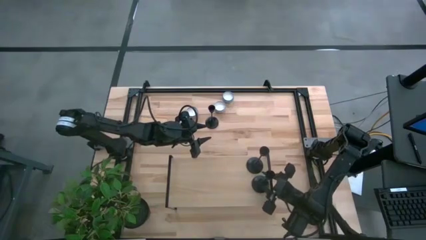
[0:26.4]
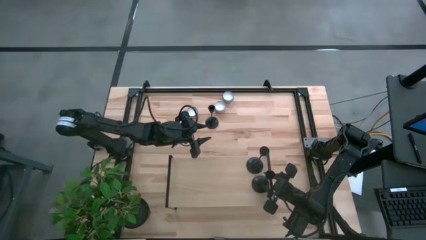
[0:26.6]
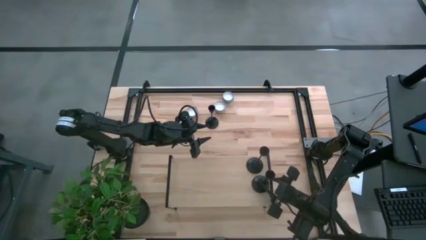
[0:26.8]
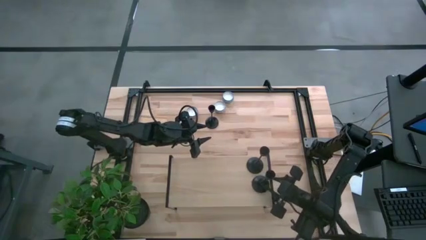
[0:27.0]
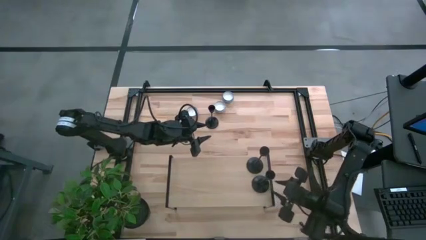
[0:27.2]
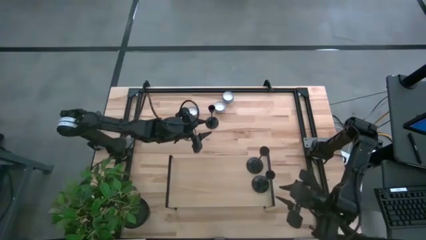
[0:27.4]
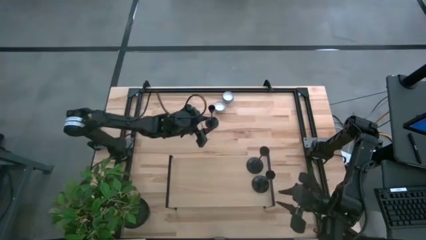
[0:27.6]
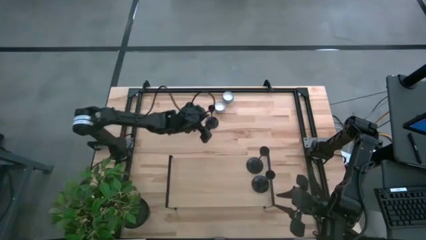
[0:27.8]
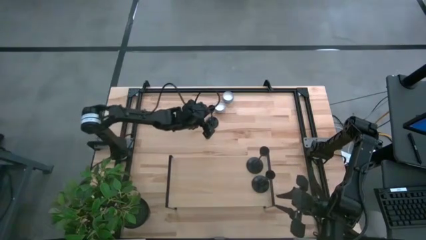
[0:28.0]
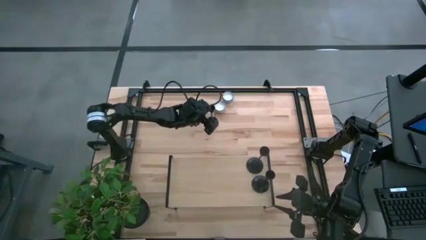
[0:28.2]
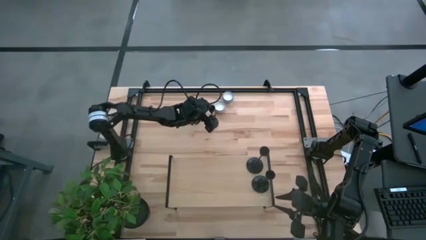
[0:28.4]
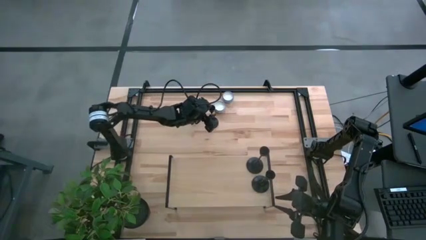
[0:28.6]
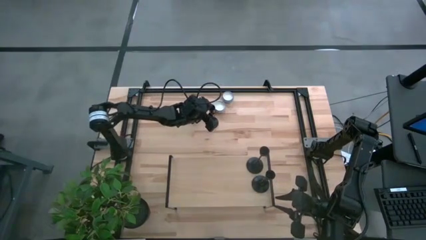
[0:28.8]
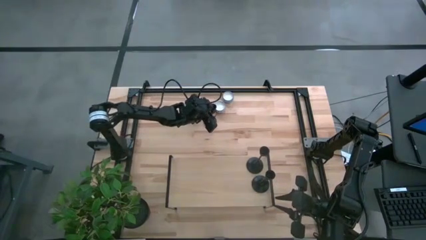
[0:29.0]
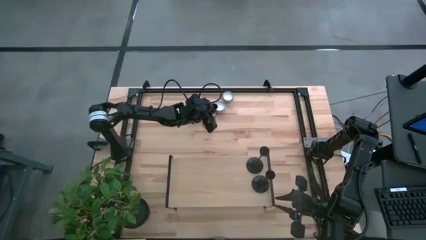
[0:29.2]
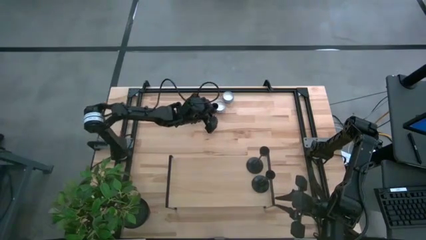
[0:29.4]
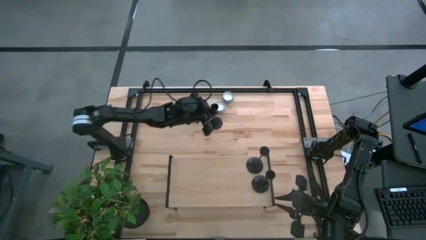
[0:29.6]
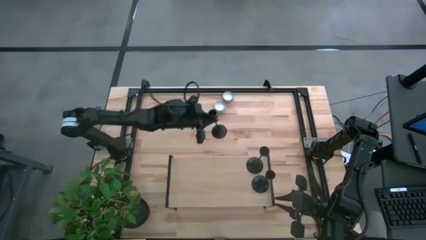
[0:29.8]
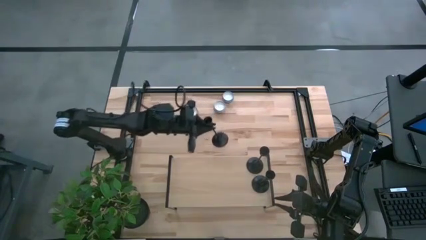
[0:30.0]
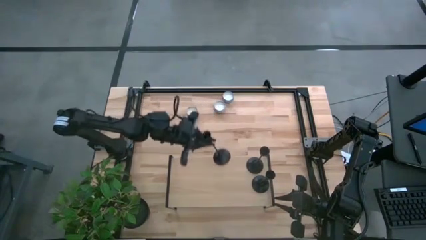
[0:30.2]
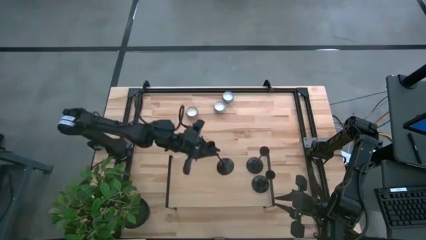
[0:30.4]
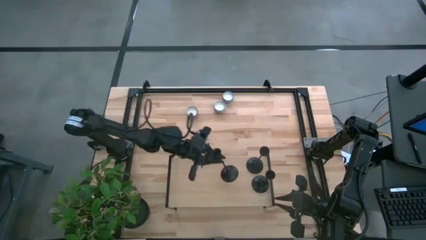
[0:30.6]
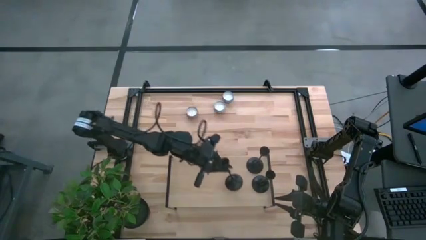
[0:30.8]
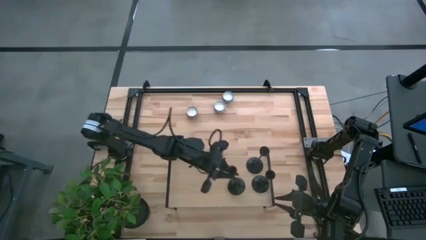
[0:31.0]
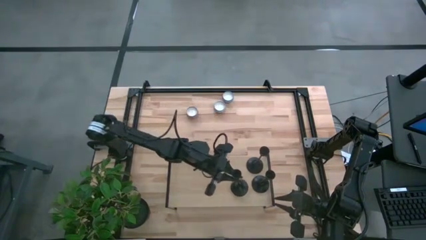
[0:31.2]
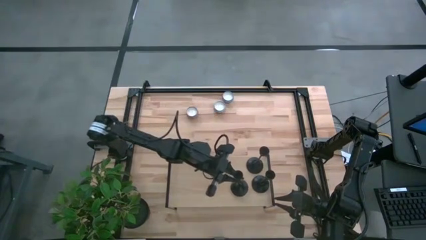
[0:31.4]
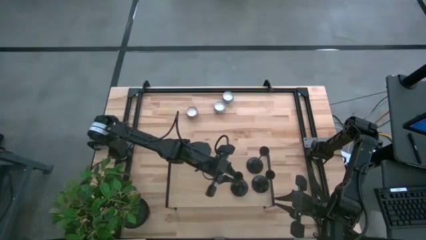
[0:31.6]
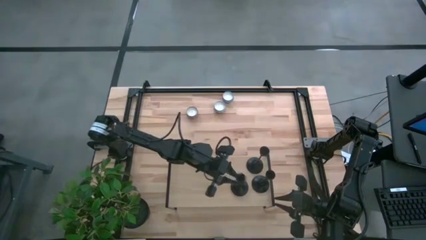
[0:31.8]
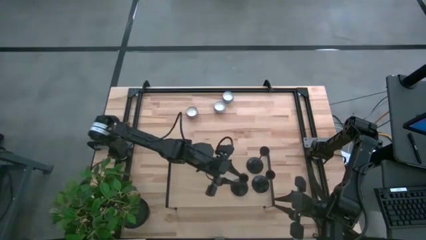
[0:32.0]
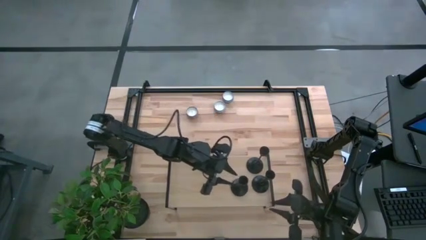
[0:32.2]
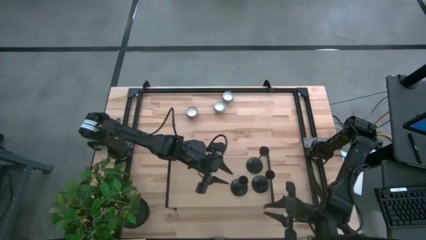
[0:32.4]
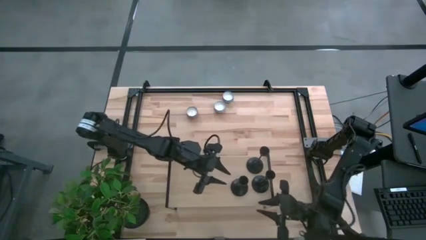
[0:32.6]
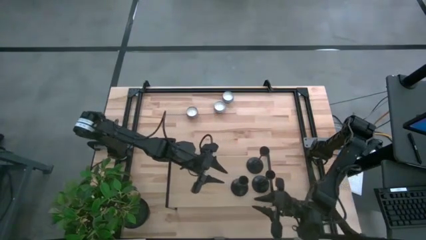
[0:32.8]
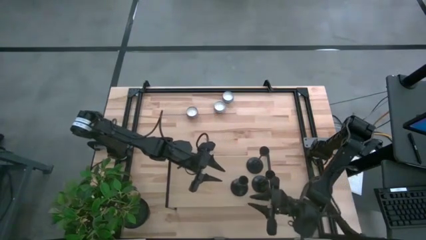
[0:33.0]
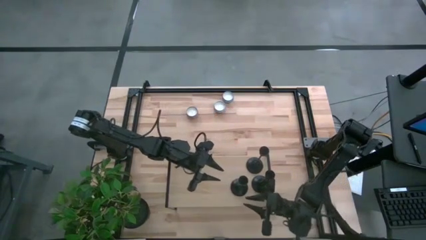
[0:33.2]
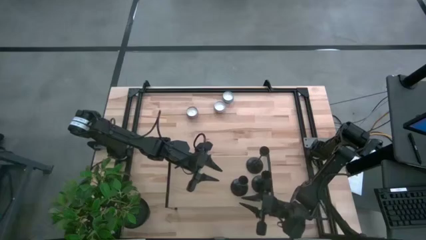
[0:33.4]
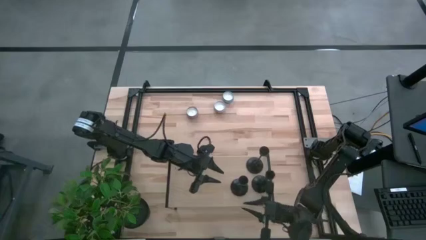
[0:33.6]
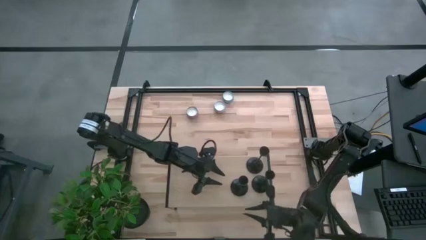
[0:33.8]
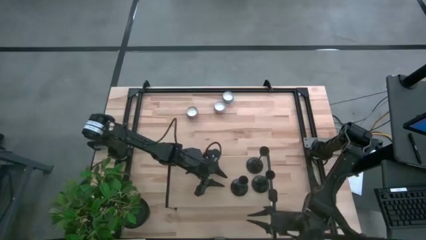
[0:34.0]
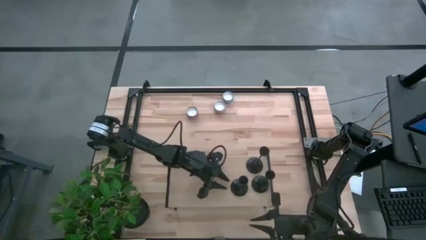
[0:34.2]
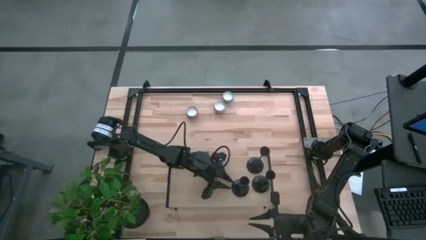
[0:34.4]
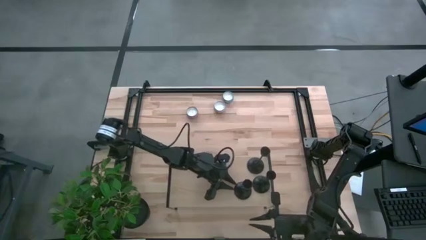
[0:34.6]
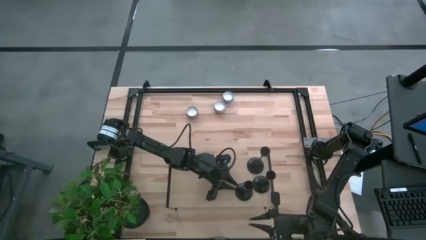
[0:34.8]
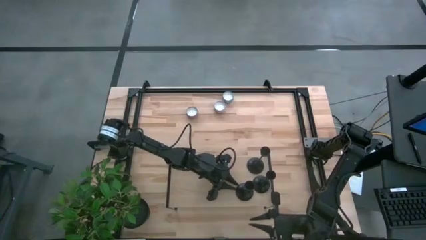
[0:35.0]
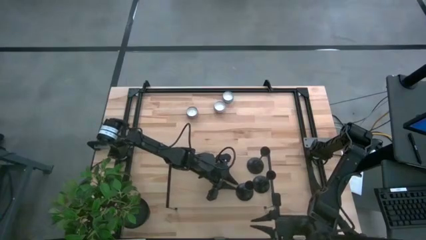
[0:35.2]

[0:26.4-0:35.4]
Task: Pick & Place candle stick holders
Put the black candle holder on the shelf

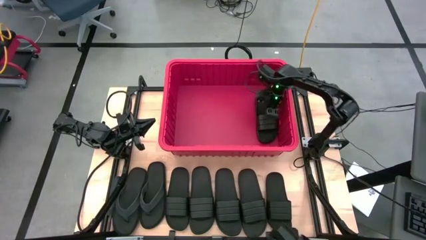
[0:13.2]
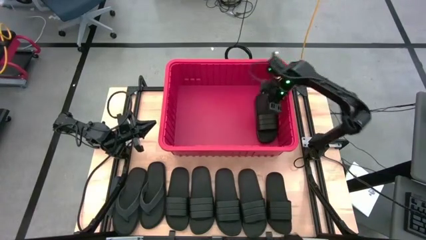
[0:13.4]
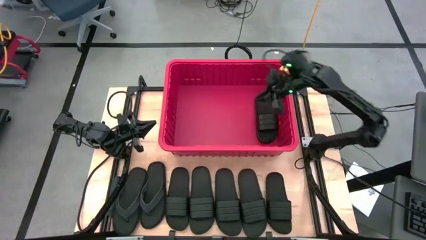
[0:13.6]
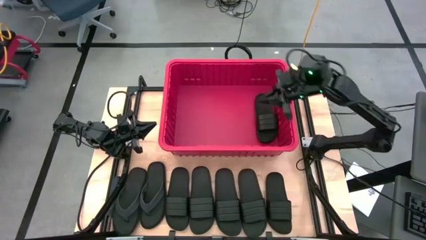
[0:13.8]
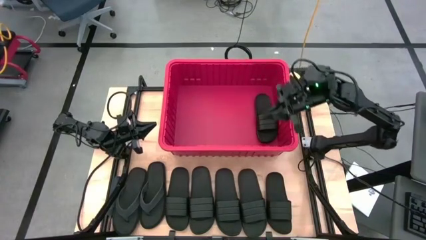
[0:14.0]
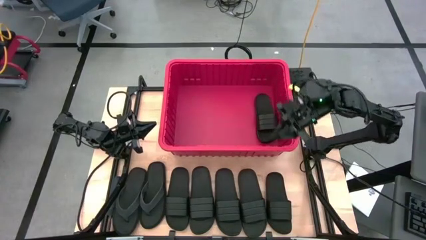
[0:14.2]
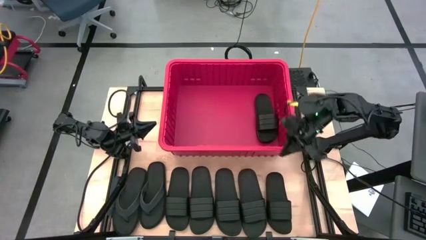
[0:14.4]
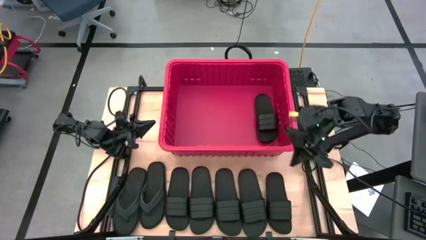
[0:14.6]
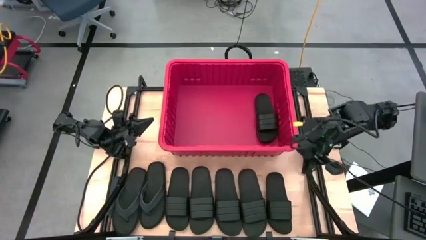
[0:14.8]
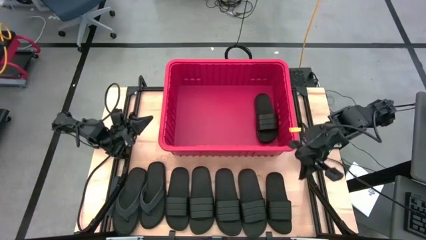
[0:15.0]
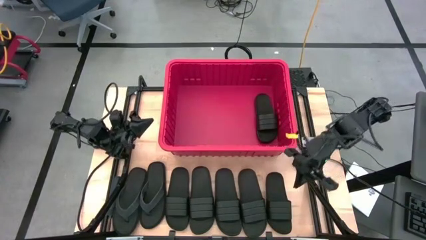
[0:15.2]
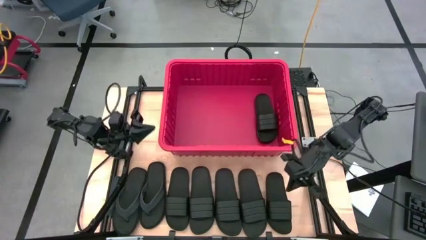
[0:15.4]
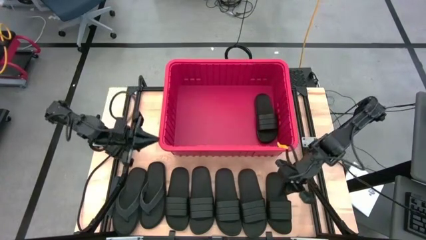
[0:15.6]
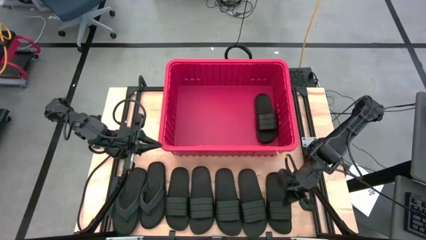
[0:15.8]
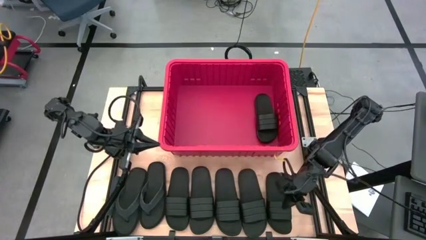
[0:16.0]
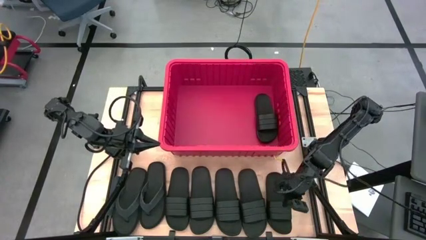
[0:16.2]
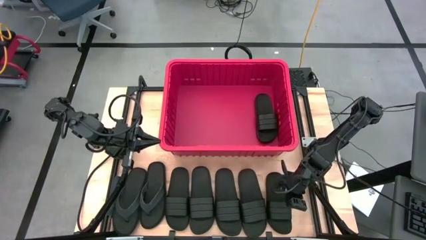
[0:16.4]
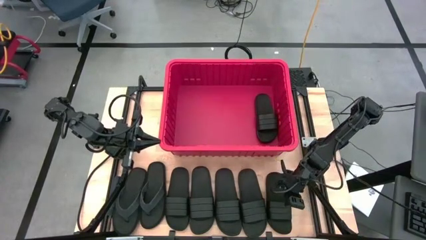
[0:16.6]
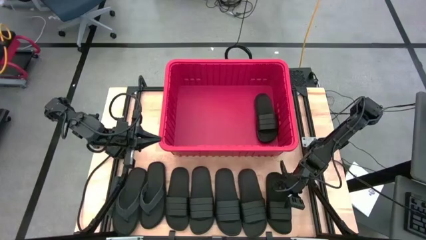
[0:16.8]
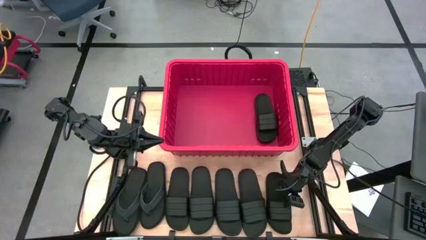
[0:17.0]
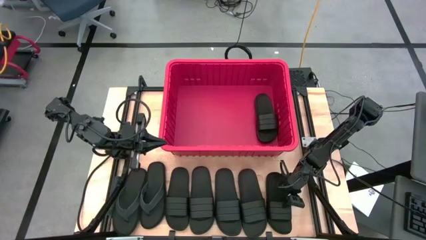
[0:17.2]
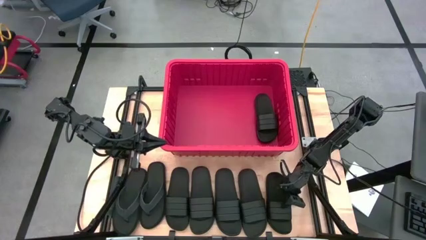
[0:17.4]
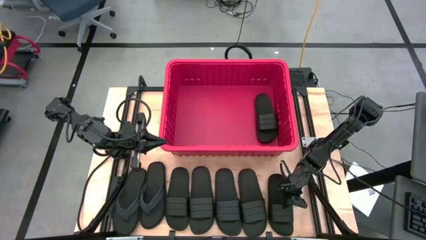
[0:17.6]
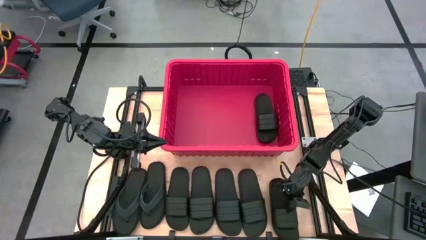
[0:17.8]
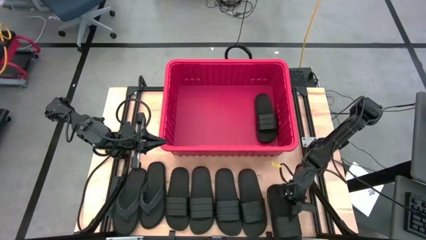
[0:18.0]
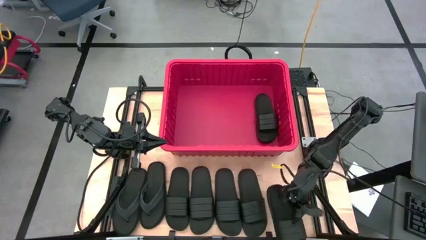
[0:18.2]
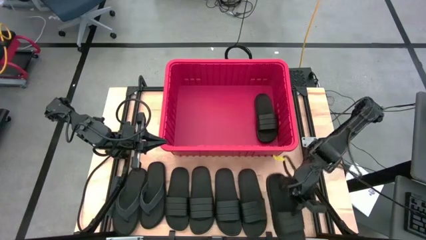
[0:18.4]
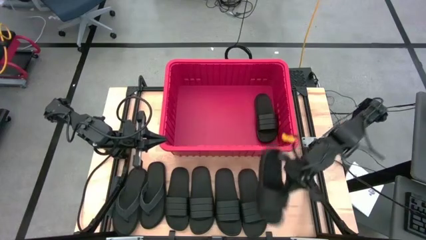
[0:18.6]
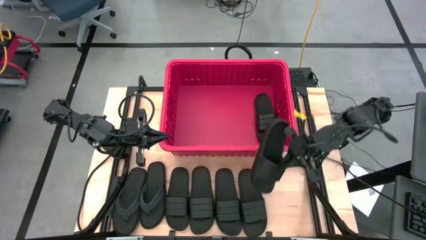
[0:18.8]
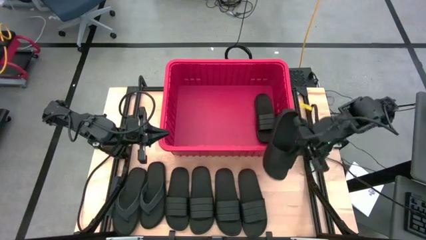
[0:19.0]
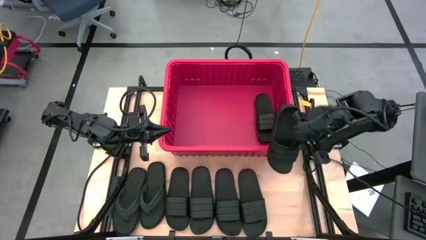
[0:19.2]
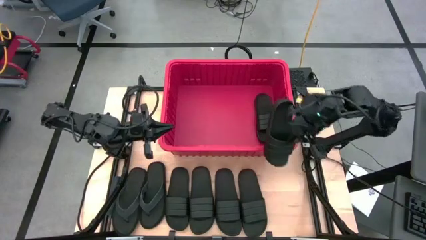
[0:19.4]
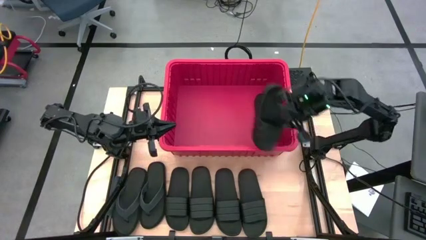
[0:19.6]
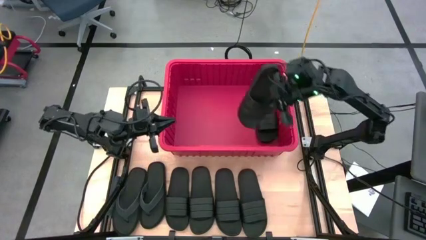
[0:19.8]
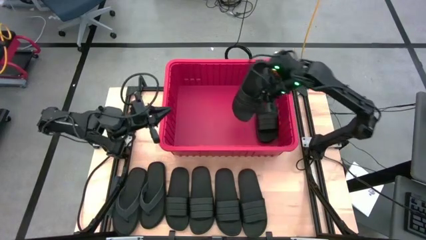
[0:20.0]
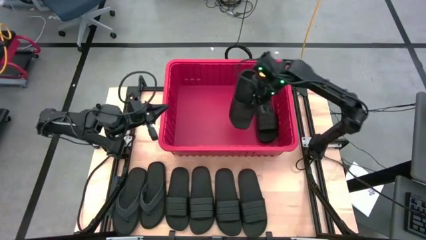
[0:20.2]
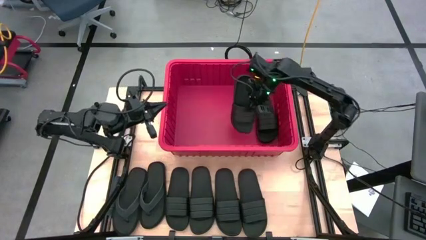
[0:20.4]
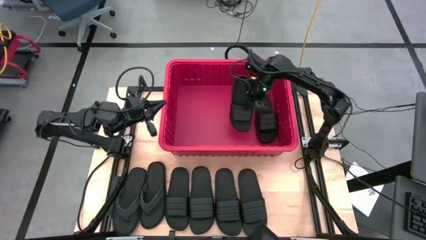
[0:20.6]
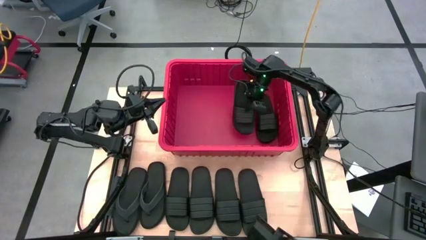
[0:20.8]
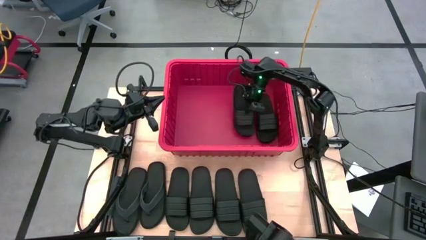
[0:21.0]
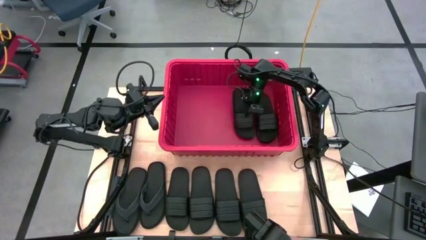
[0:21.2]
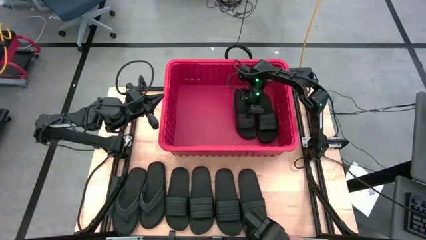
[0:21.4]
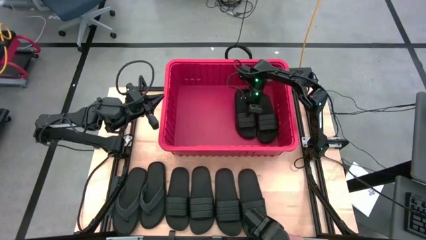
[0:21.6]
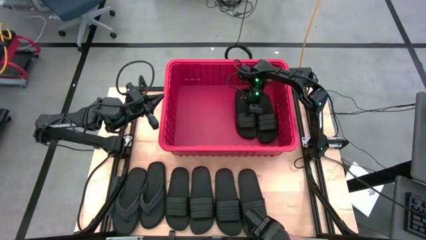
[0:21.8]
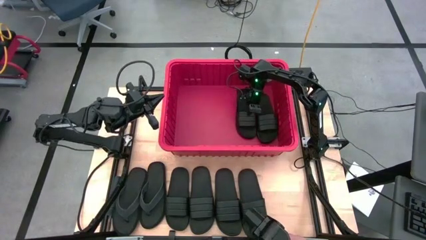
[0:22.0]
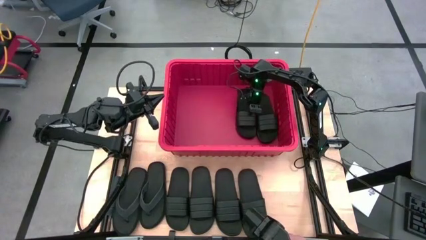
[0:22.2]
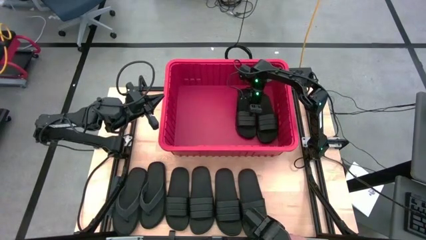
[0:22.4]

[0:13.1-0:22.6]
Task: Pick and place slides into bin
Put the black slide into the red container
